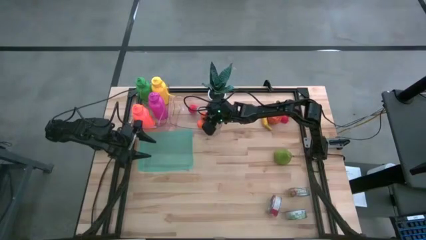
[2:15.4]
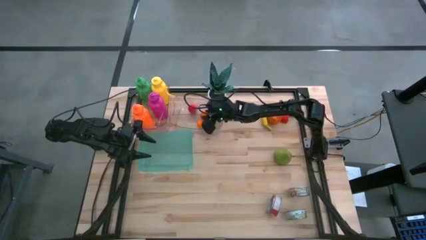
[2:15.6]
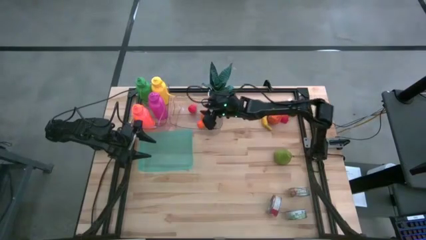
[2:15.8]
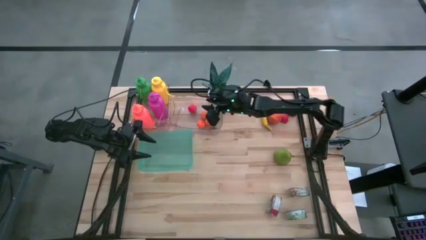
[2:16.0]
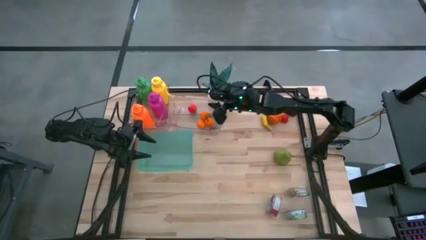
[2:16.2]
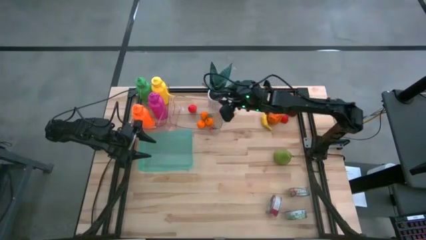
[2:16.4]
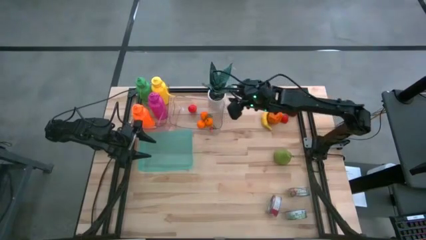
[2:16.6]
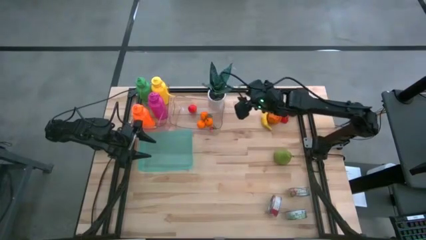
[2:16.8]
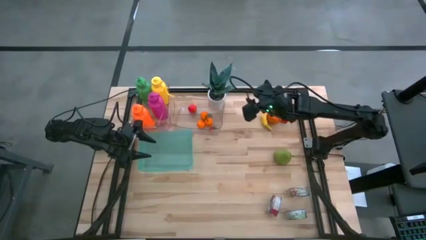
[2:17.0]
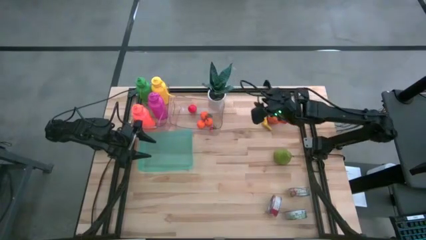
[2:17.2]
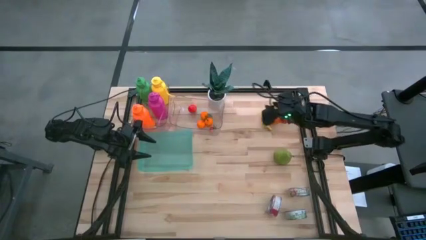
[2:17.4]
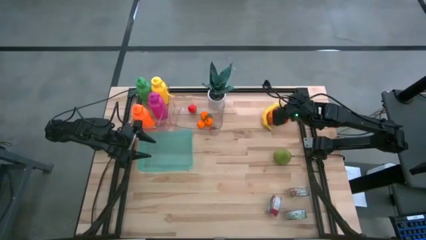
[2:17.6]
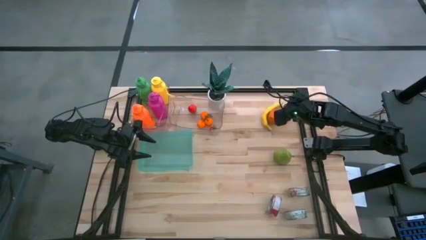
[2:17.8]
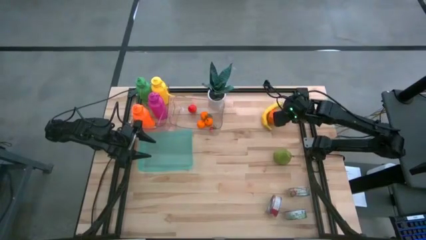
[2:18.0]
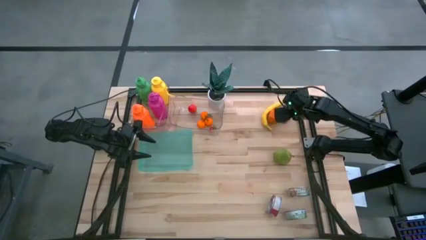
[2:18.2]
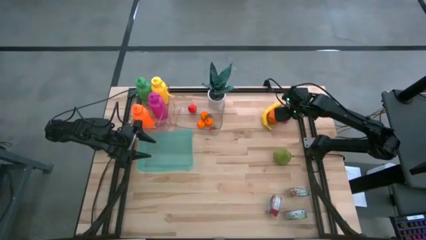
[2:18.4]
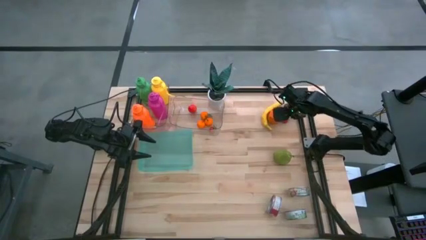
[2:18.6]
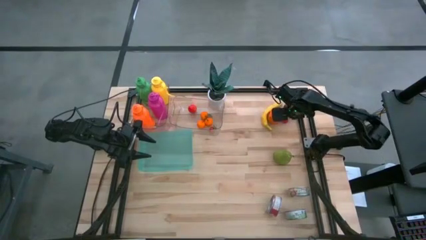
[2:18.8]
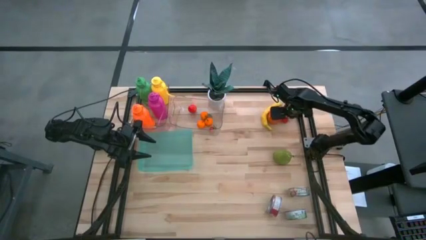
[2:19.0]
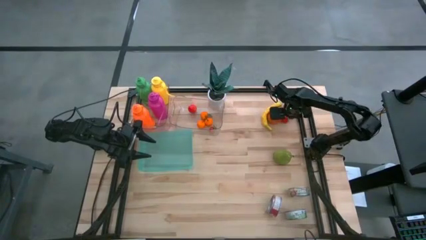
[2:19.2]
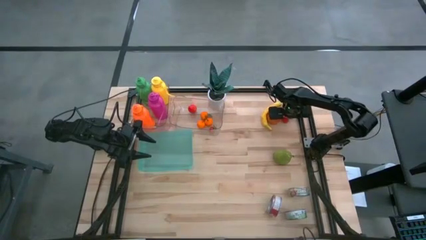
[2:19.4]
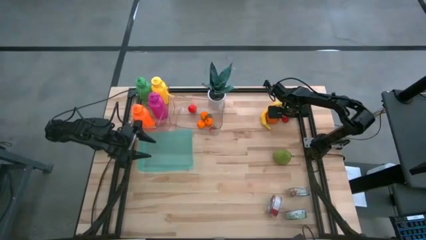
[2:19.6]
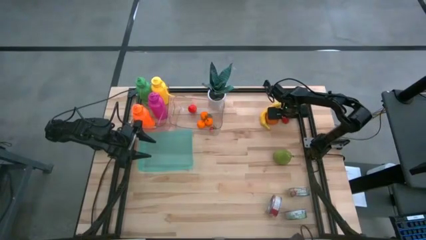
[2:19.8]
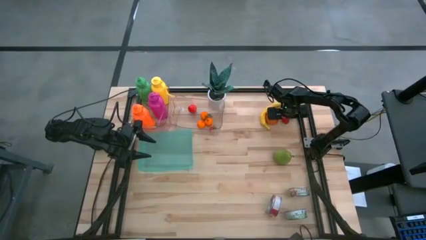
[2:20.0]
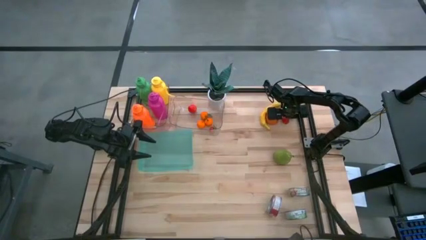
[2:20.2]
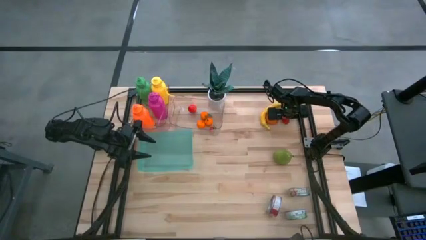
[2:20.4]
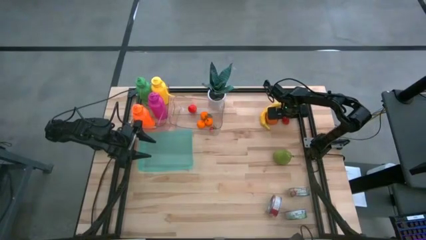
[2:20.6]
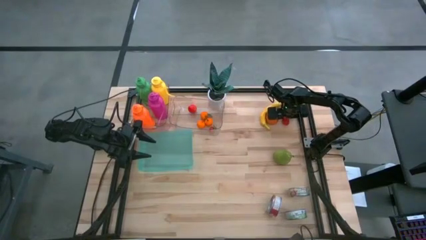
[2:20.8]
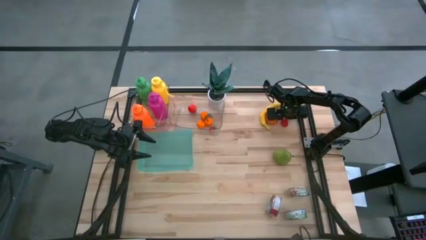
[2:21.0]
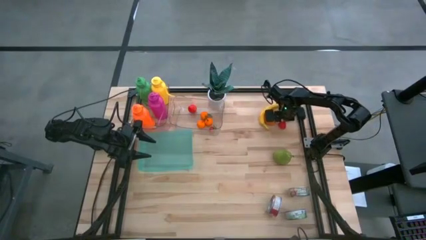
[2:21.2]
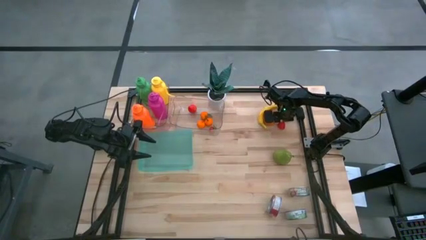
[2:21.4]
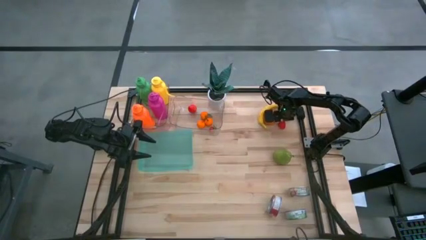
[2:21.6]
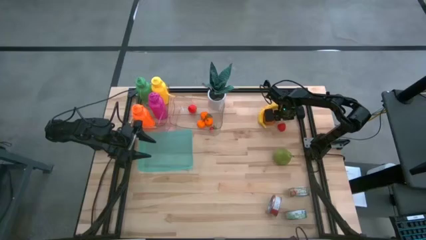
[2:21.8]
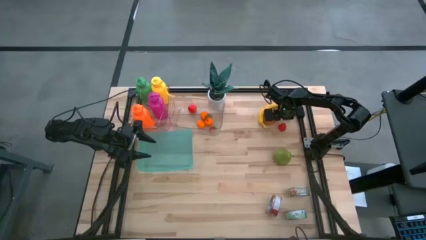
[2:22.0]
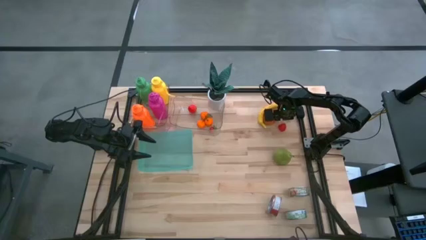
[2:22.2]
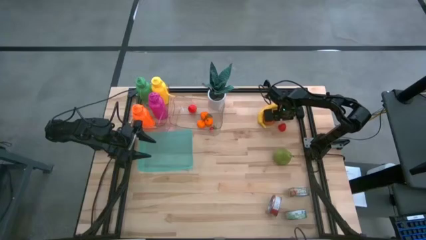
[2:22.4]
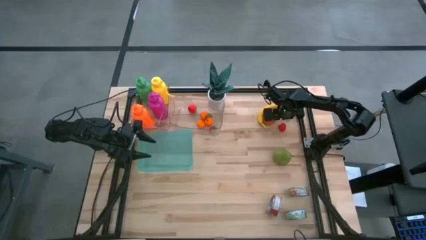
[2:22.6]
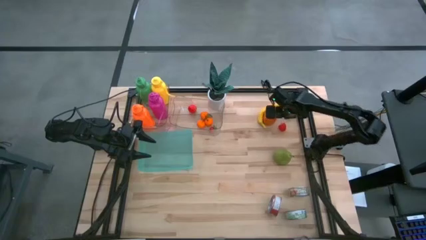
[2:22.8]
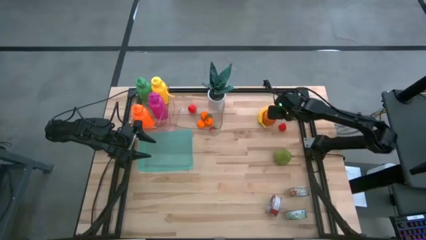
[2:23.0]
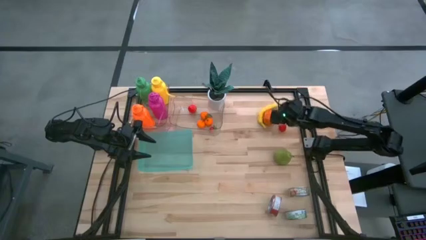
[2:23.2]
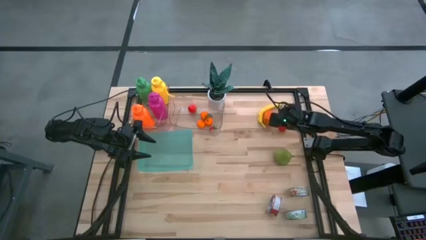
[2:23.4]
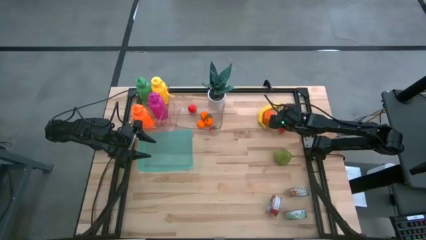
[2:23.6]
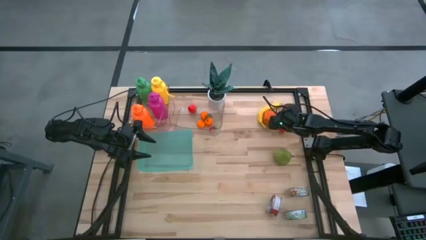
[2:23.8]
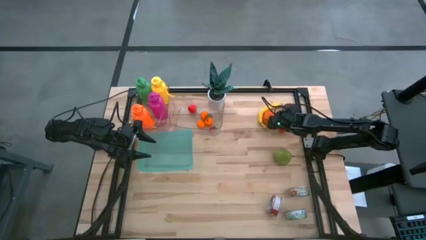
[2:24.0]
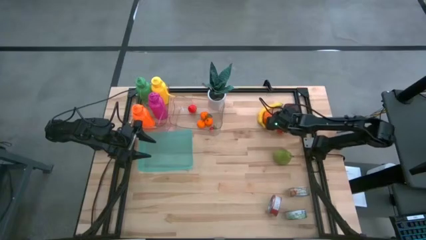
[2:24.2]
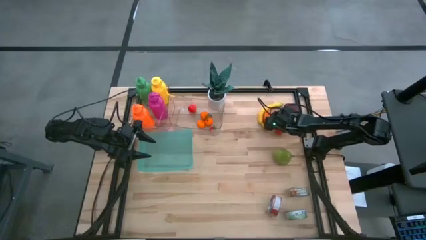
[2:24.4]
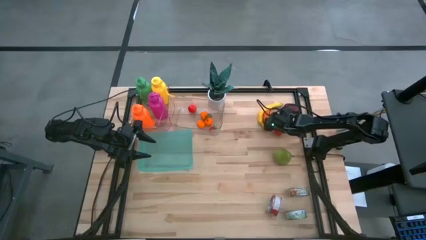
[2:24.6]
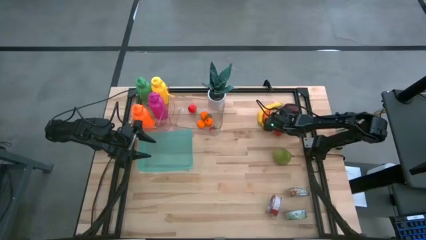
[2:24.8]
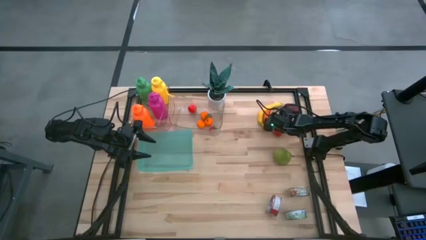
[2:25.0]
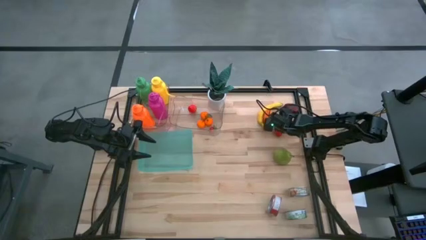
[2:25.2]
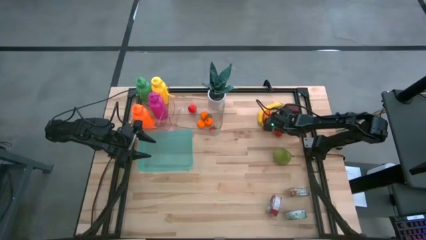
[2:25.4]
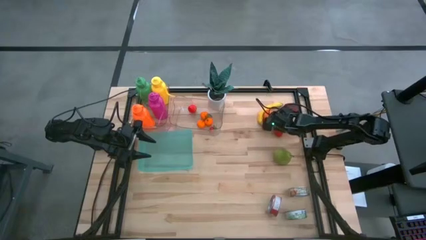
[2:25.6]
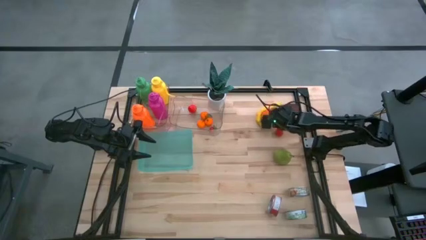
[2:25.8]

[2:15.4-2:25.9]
Task: Pick & Place Food Item
Put the red cherry into the right transparent bin

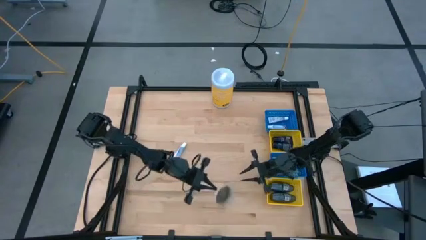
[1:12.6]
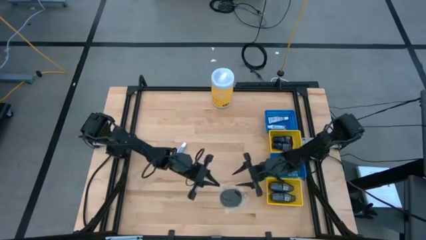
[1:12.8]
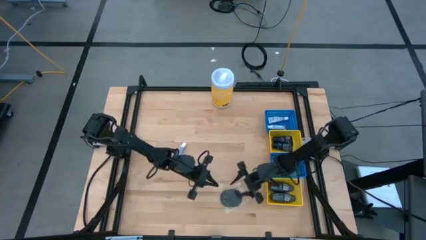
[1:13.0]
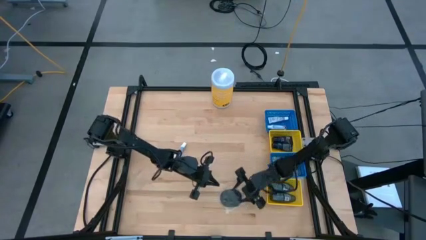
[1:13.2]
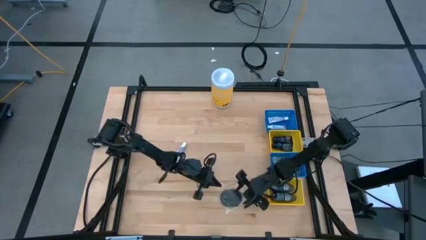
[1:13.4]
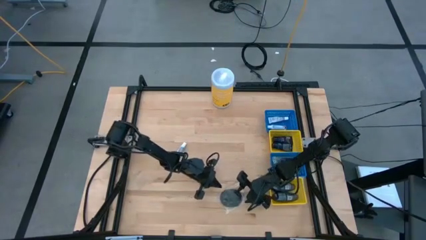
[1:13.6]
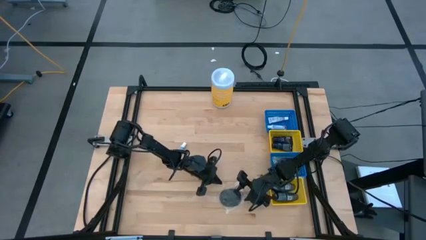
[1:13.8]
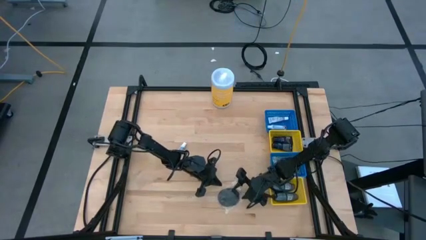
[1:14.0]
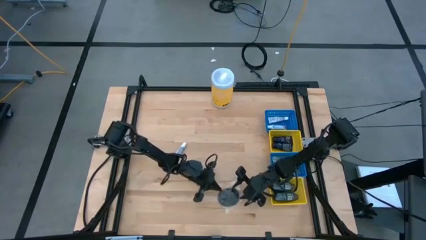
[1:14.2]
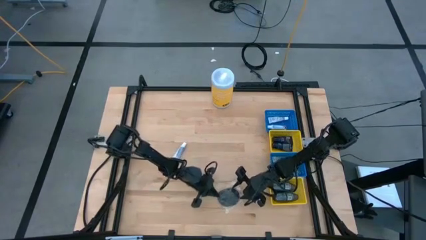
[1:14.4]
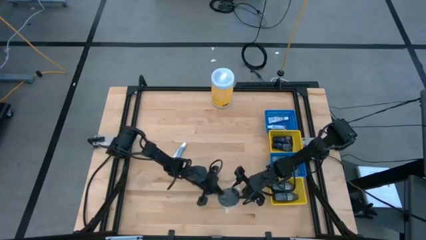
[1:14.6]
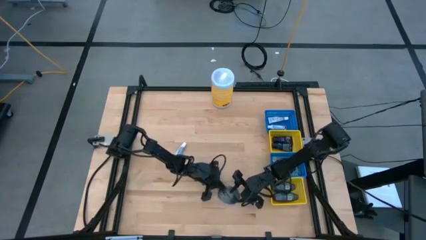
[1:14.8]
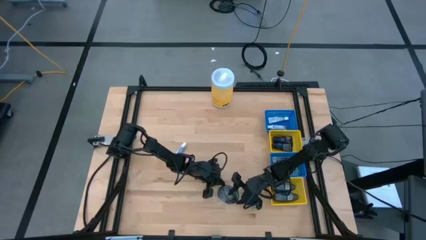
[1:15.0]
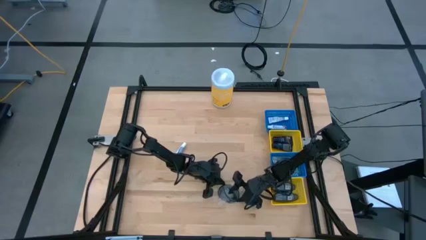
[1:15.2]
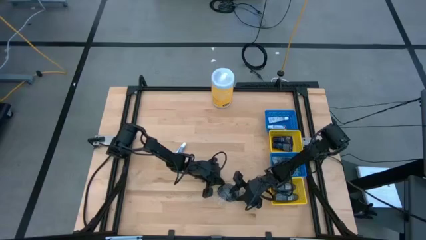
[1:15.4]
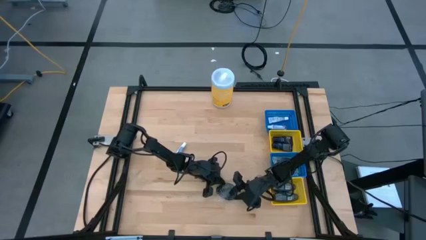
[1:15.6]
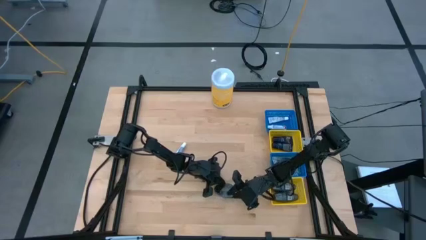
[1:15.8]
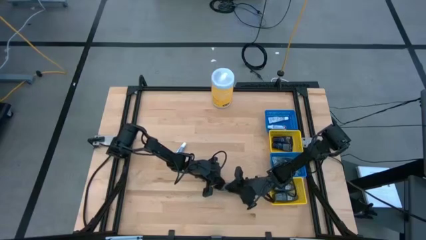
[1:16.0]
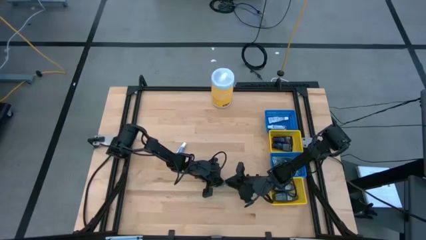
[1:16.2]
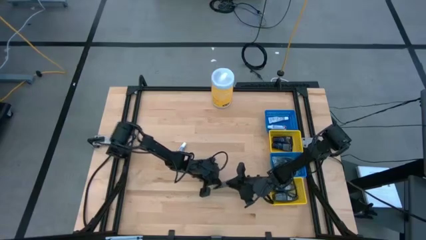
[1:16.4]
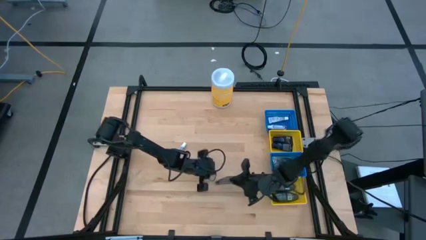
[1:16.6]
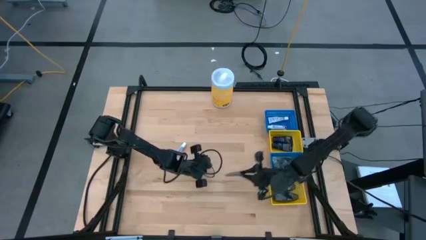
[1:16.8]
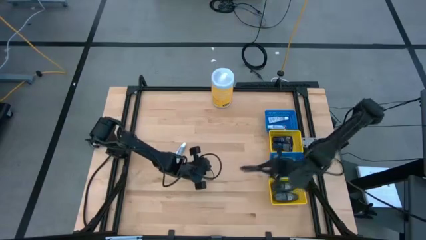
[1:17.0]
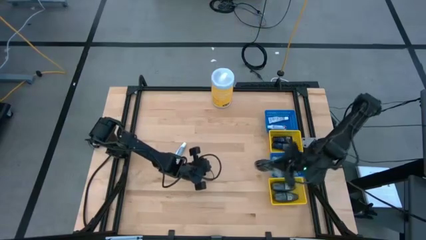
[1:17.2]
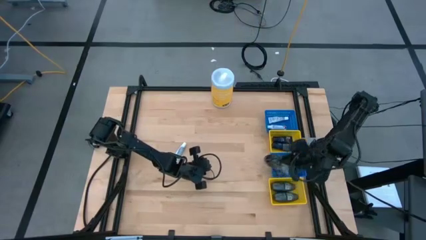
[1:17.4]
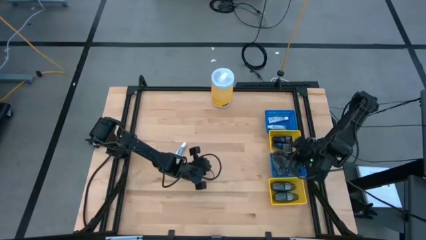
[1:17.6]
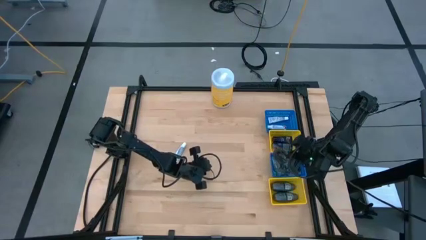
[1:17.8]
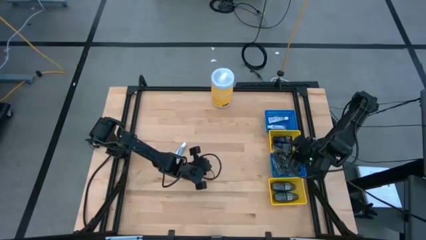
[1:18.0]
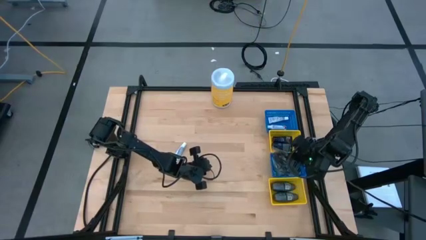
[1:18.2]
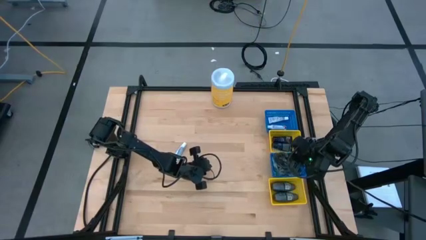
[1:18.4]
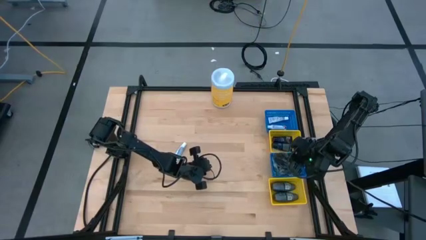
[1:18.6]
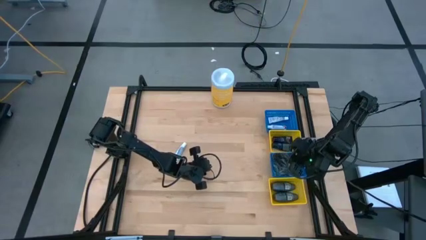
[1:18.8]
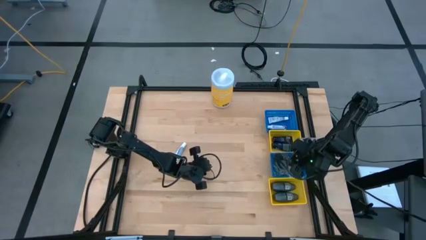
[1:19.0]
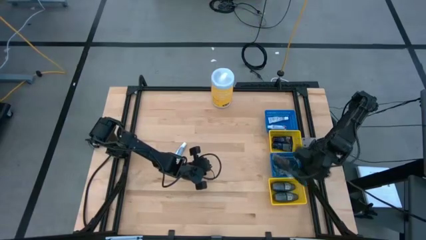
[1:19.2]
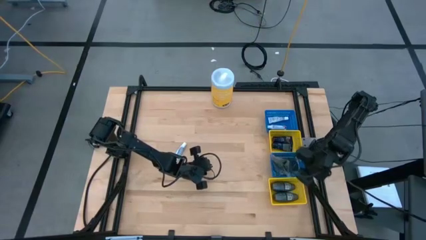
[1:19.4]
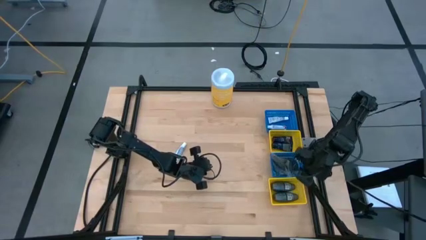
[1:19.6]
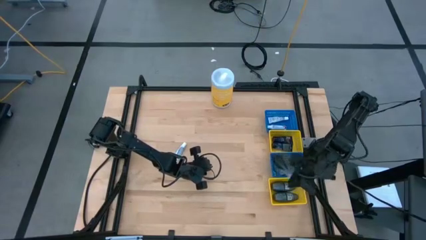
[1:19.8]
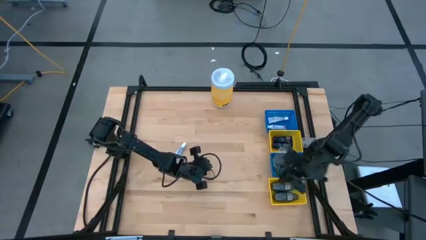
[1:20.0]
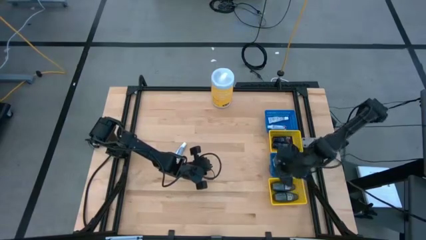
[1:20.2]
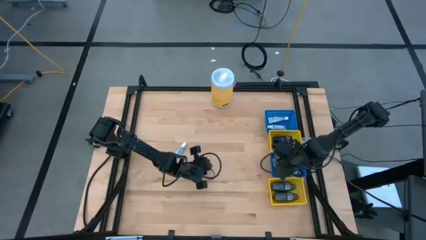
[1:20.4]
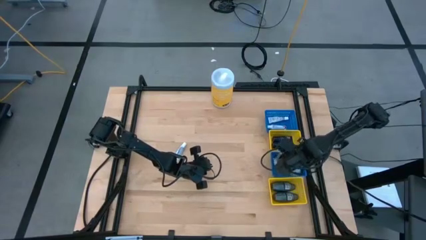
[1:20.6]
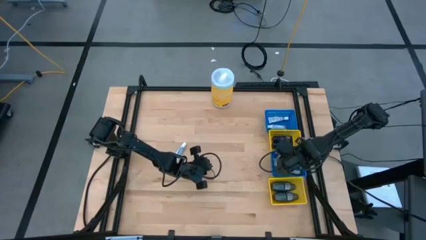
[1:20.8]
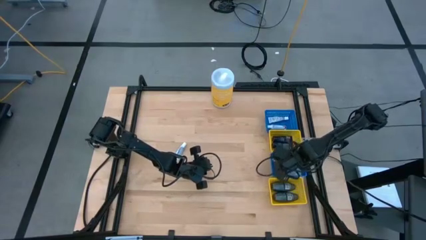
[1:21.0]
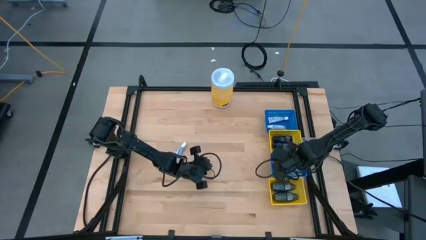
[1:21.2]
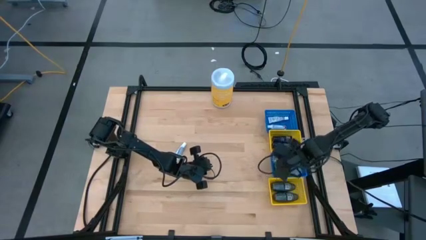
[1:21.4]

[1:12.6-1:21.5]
Task: Pick & Place Travel size toiletries
Put the black hairbrush into the bottom blue bin
